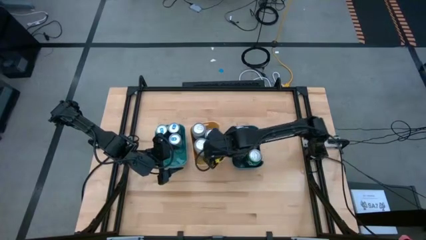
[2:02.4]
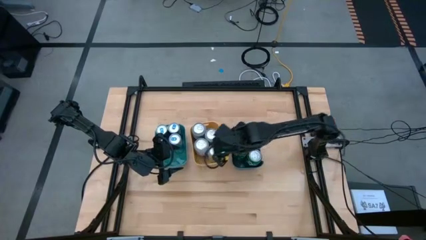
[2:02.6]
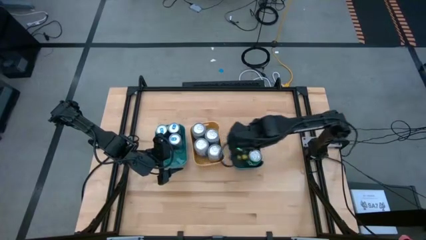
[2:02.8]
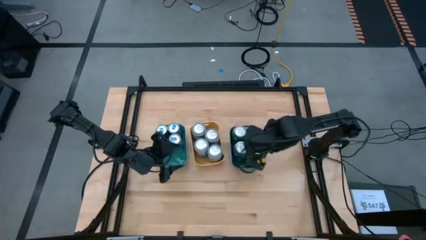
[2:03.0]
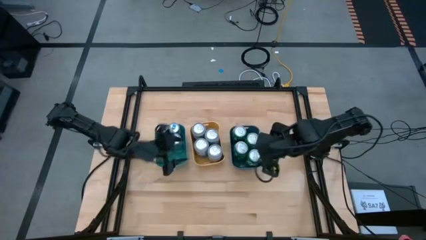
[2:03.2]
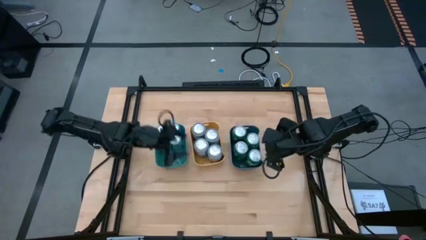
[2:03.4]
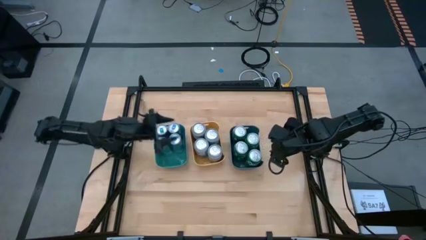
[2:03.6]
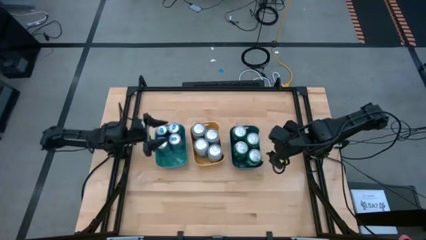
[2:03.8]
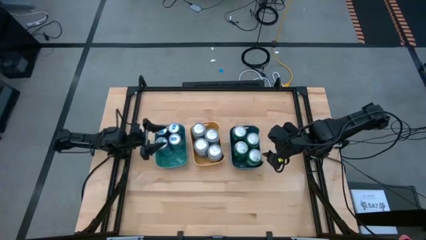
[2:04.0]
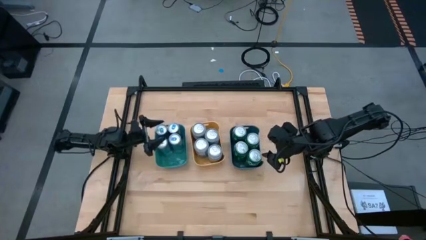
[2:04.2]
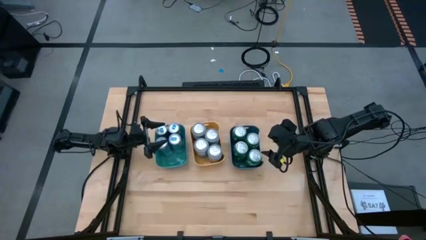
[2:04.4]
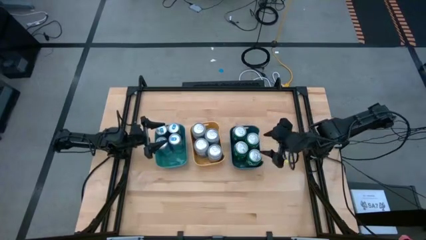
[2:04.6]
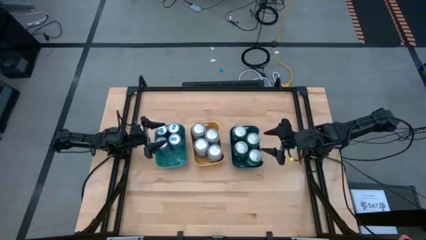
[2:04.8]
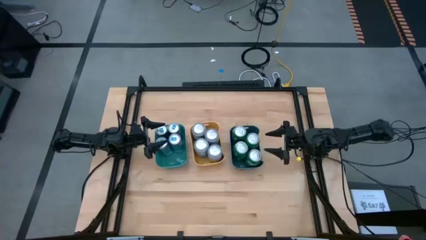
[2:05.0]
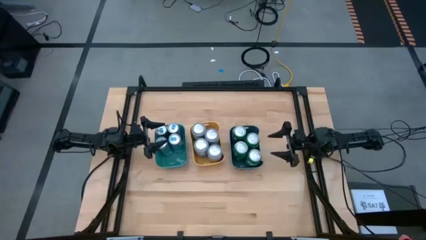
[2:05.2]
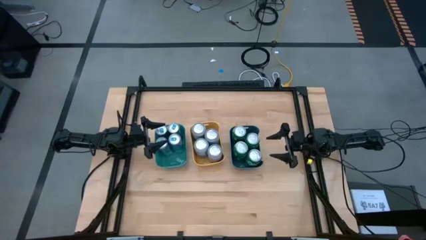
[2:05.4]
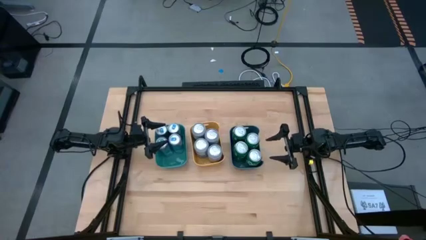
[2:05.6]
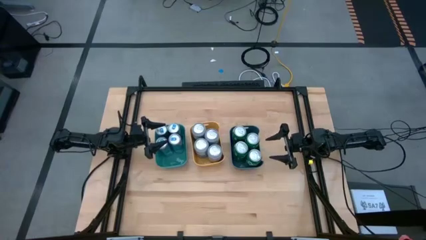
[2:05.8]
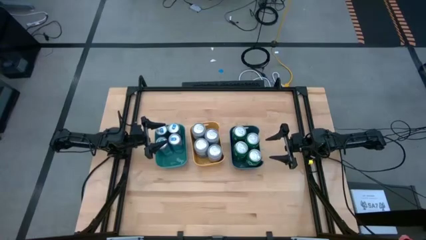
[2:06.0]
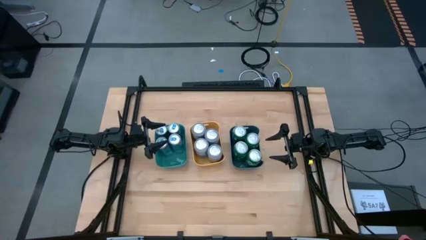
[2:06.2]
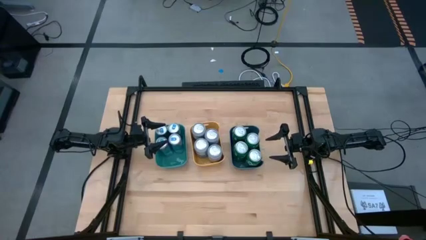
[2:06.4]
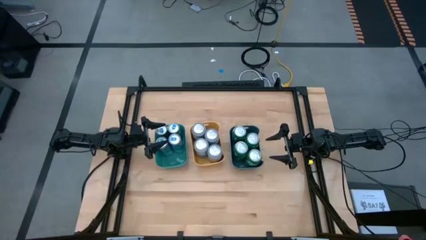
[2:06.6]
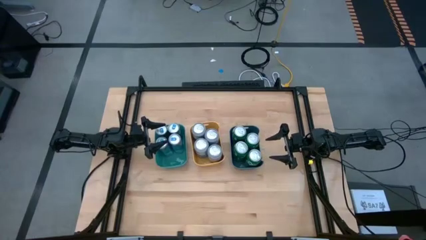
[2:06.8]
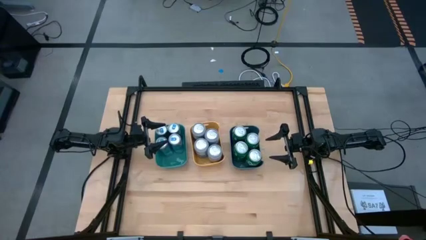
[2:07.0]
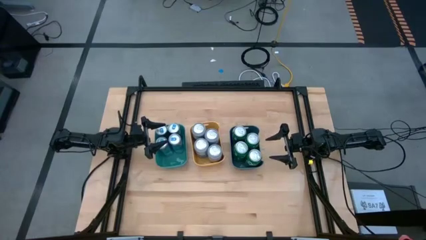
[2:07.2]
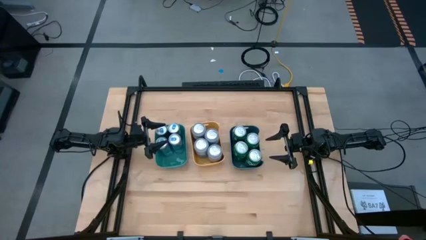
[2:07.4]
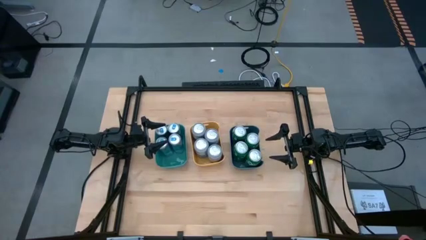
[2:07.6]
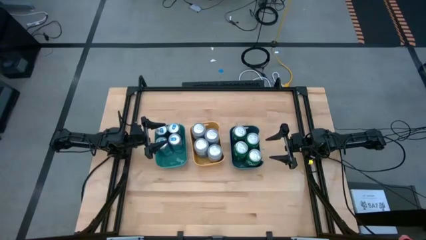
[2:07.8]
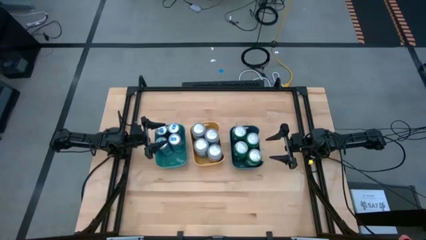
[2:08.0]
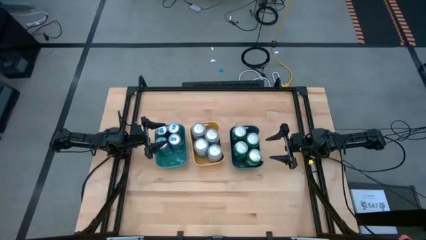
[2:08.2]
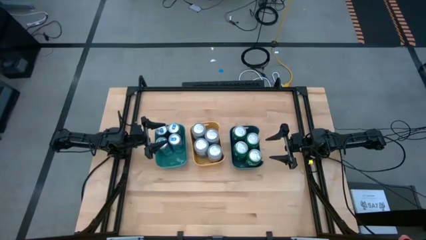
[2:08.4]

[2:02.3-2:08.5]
Task: Sort soda cans
Return to Home Position

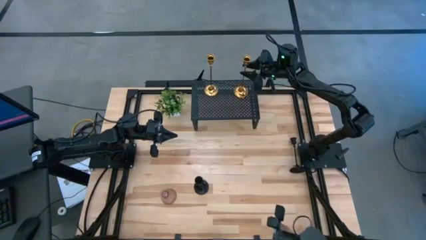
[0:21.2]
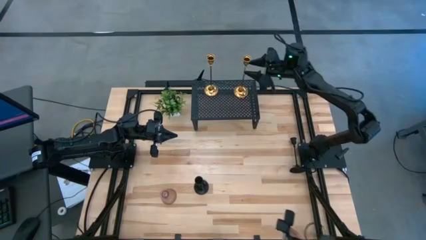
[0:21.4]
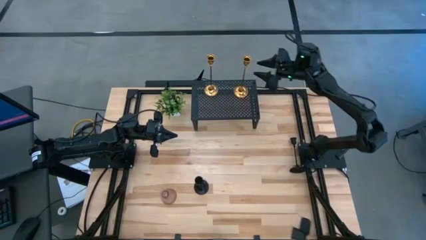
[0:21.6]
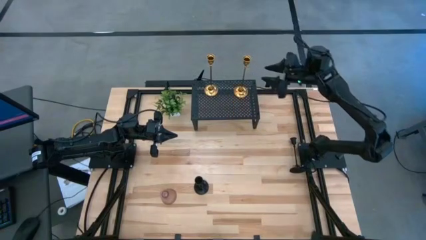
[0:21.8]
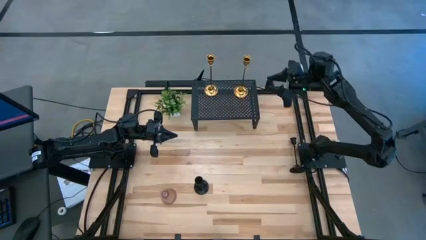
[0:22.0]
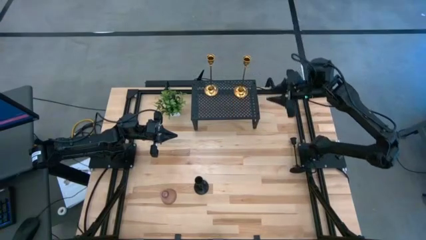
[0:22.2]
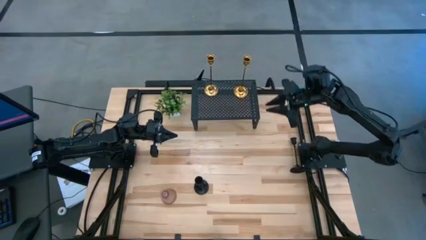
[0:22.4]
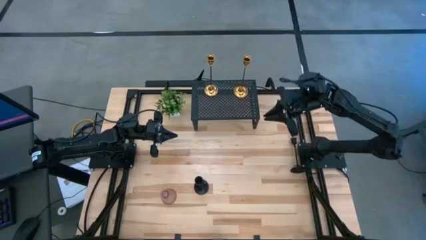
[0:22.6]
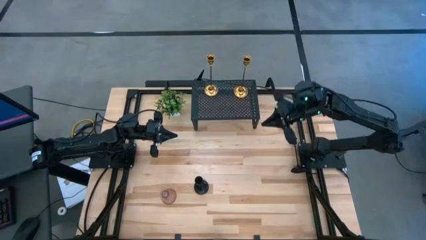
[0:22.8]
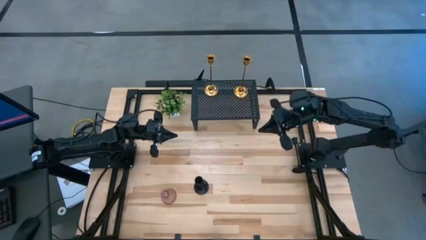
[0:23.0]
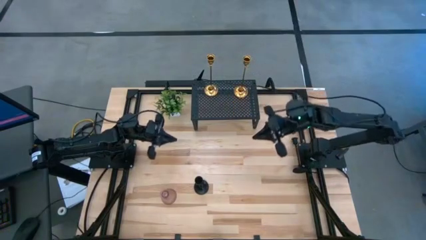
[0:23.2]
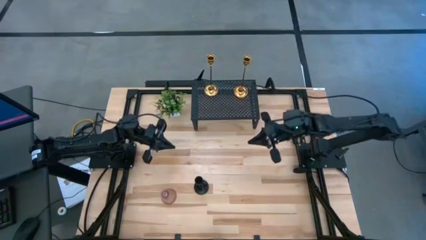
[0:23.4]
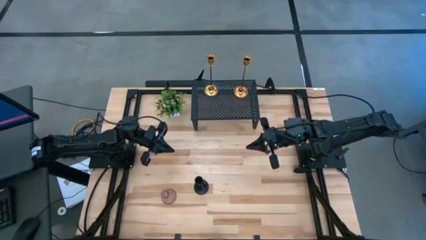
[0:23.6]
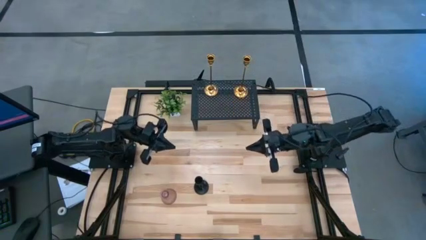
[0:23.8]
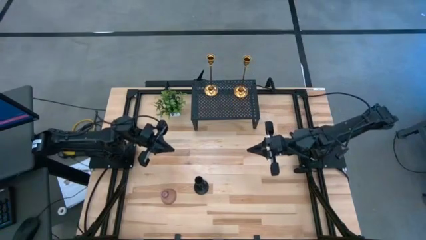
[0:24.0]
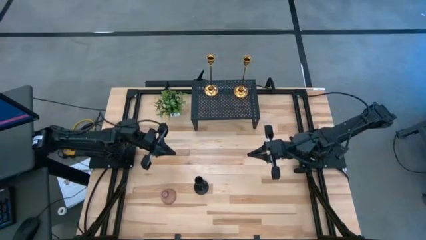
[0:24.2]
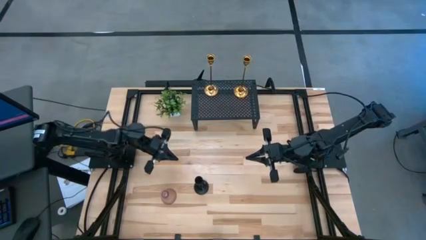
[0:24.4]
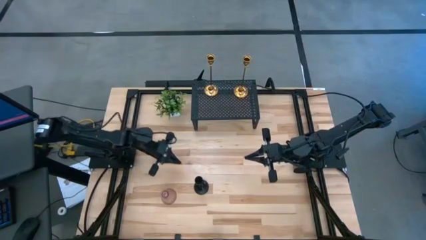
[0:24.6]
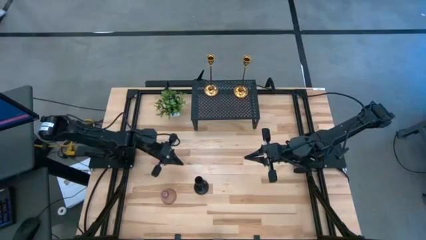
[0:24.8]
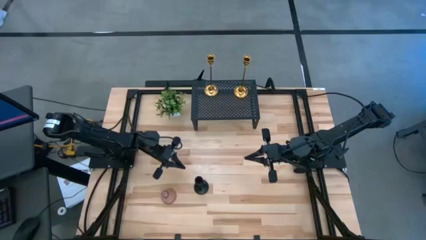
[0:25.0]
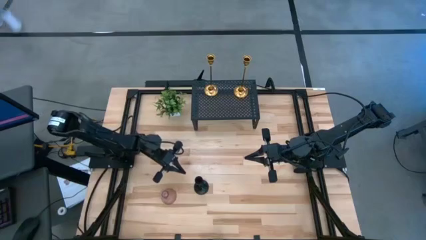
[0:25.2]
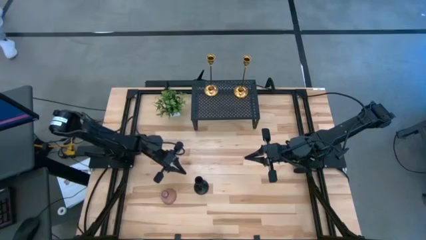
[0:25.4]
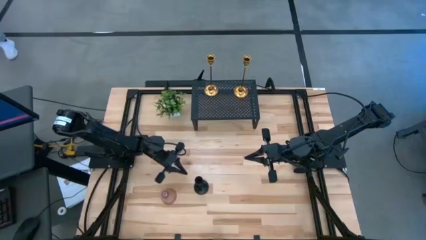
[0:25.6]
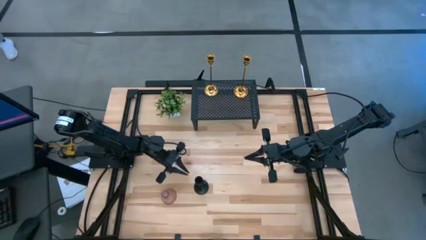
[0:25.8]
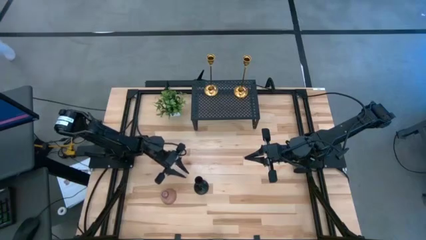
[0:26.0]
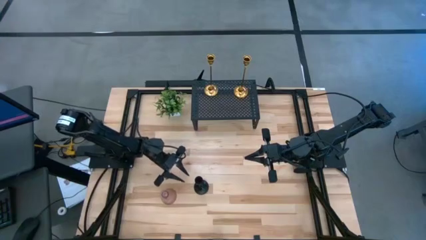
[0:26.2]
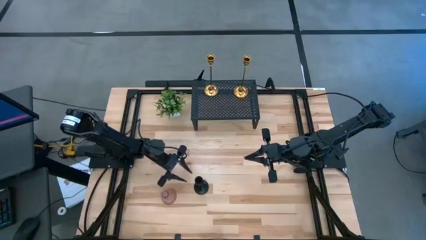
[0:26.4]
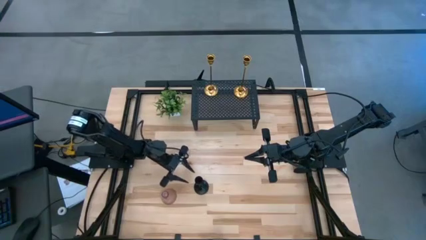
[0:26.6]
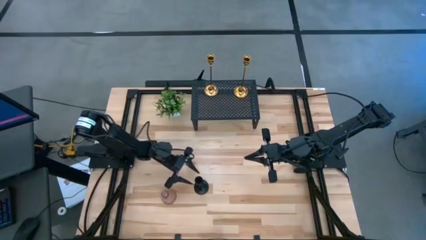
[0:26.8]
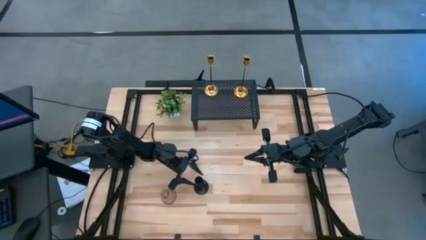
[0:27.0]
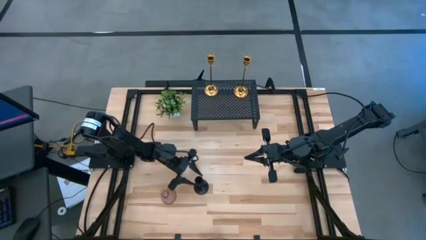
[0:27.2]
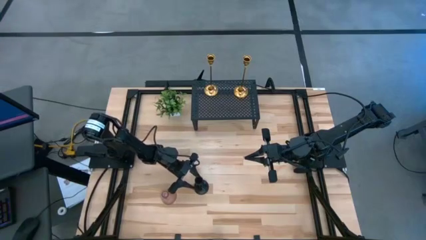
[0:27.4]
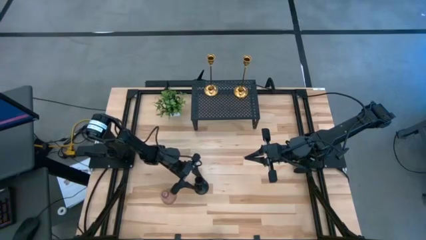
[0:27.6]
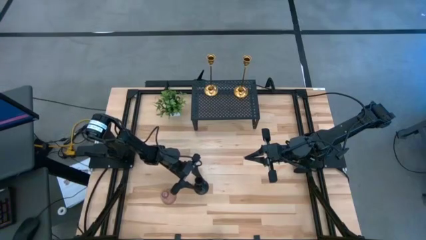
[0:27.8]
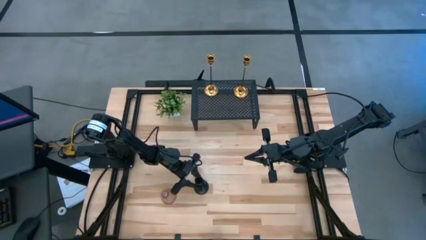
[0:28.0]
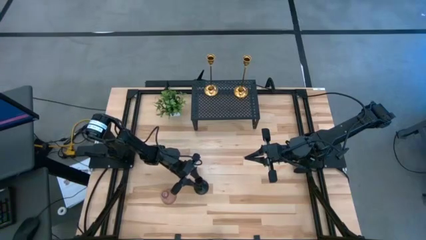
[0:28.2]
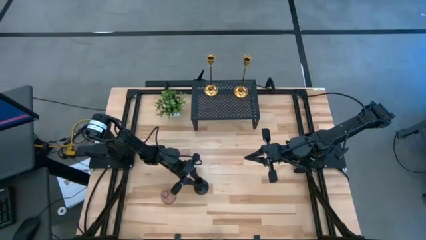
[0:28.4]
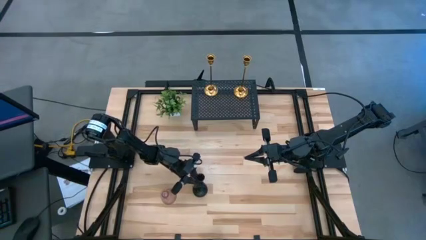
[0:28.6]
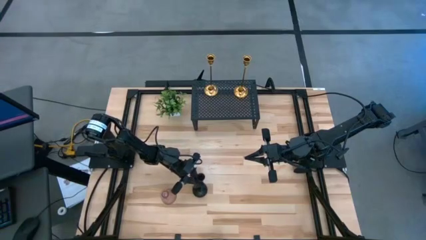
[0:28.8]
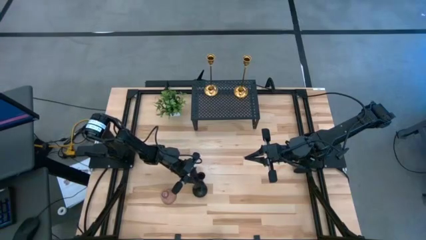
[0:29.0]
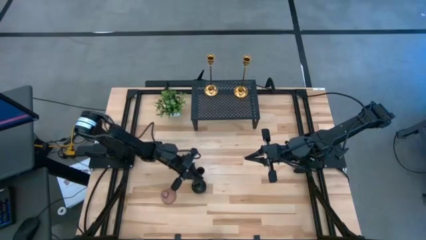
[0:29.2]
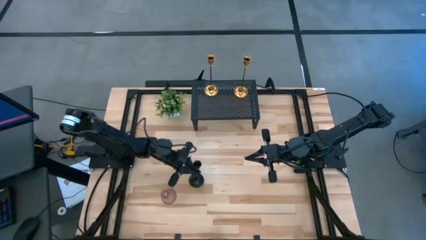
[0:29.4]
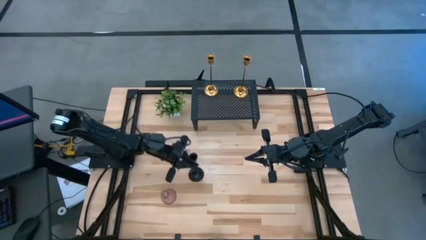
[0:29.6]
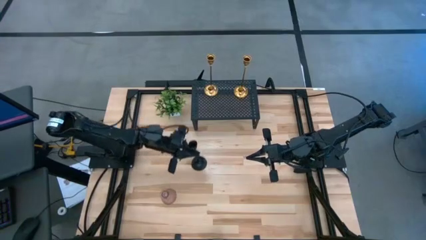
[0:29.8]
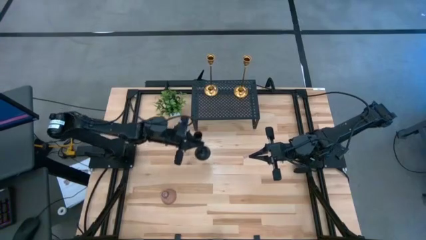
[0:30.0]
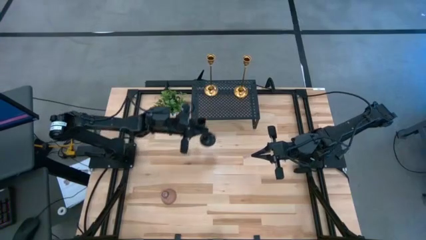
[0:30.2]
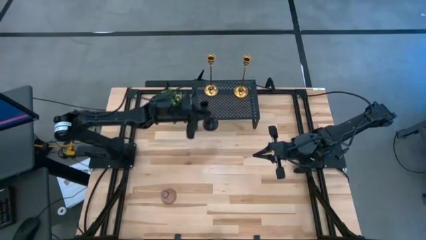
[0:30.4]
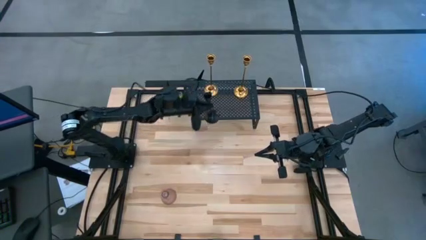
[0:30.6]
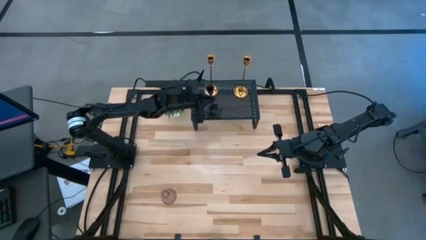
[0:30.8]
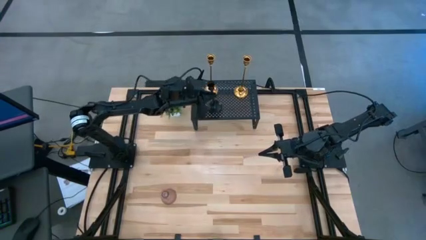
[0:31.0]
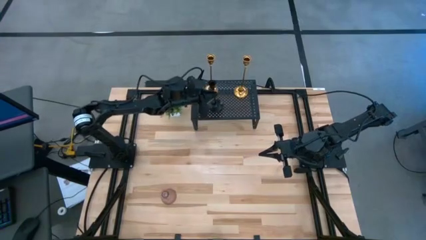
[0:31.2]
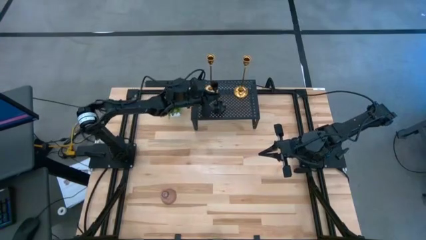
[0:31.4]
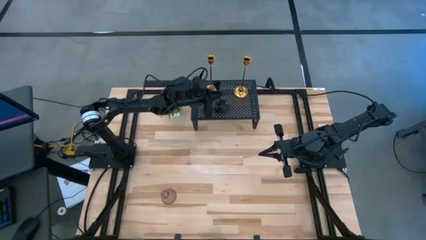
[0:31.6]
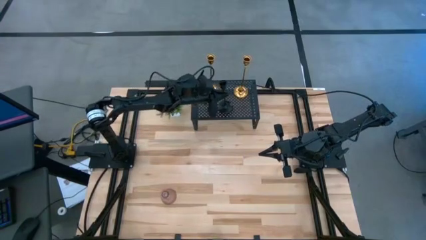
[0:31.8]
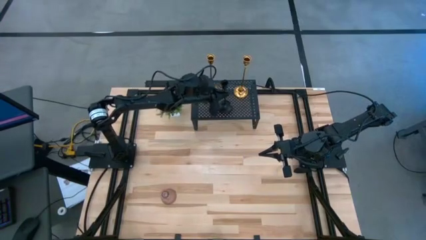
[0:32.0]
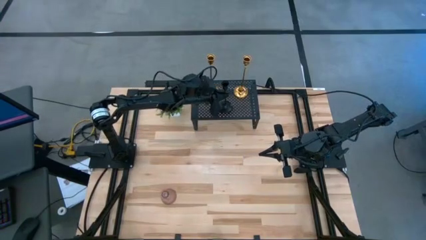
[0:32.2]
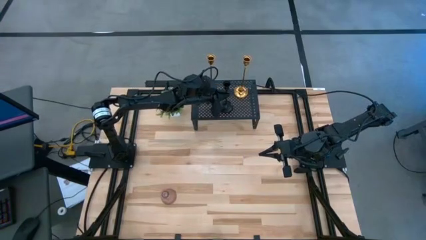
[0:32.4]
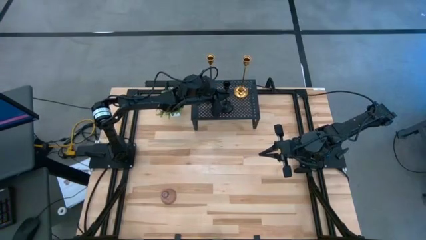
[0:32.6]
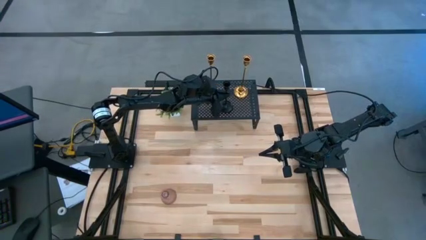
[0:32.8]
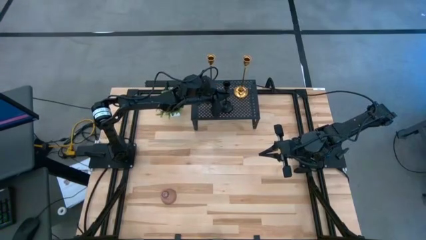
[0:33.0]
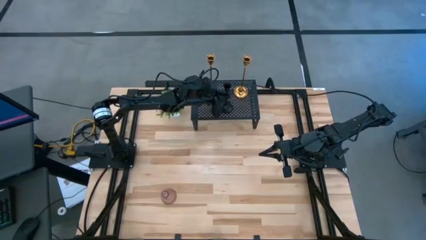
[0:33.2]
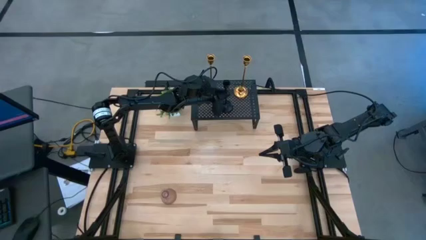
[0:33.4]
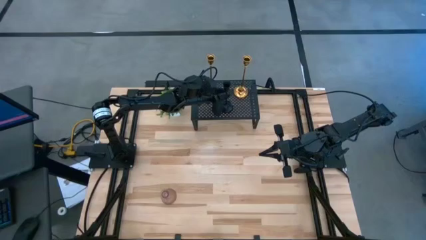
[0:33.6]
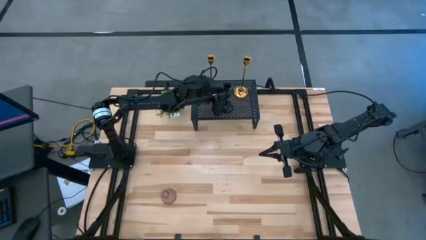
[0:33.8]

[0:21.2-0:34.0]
Task: Pick & Place candle stick holders
Put the bottom black candle holder on the shelf
